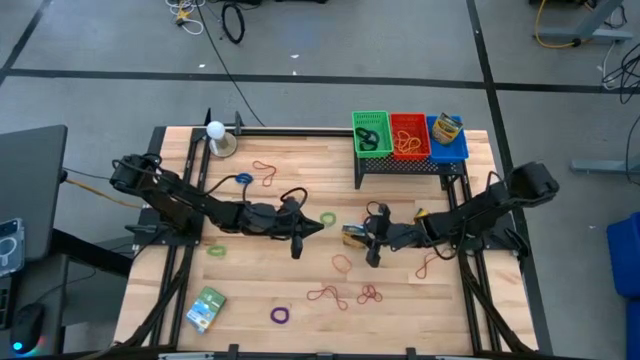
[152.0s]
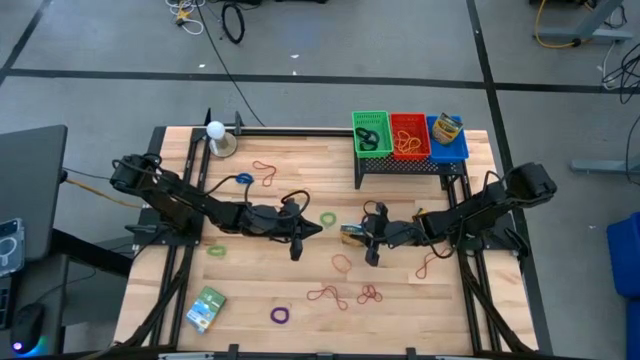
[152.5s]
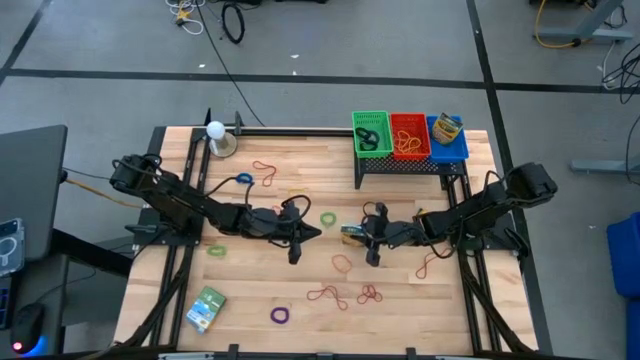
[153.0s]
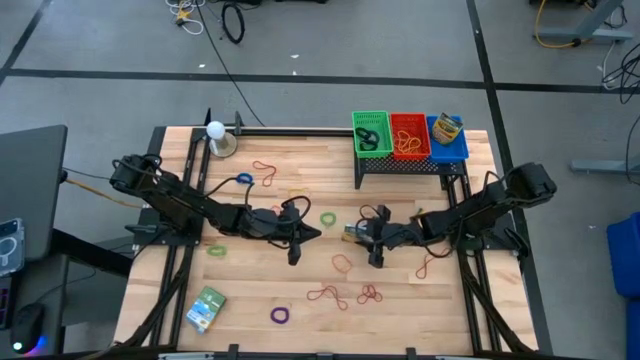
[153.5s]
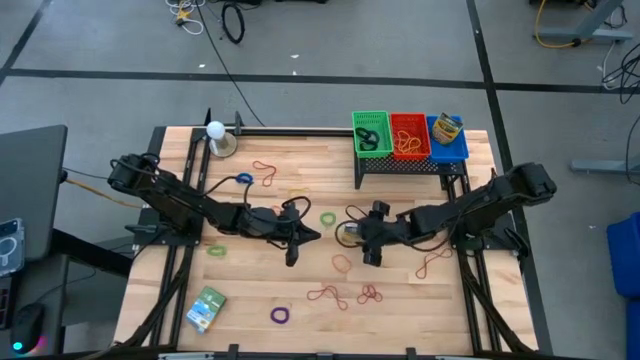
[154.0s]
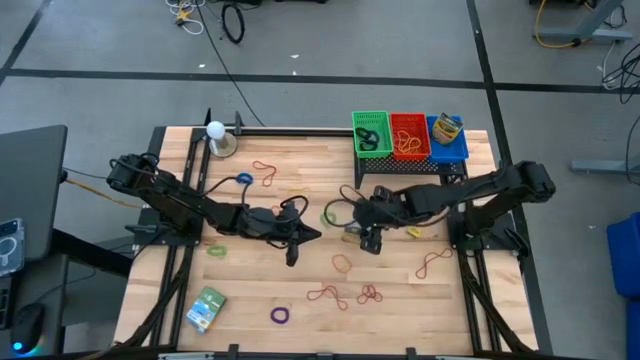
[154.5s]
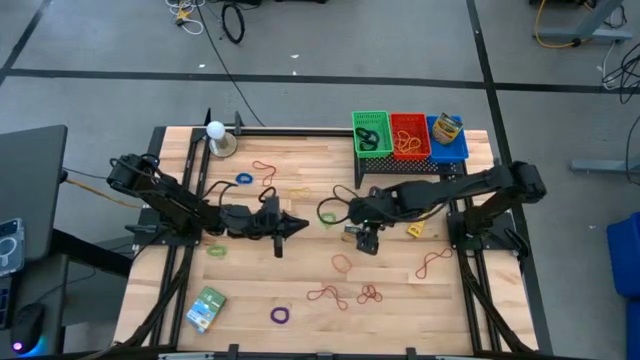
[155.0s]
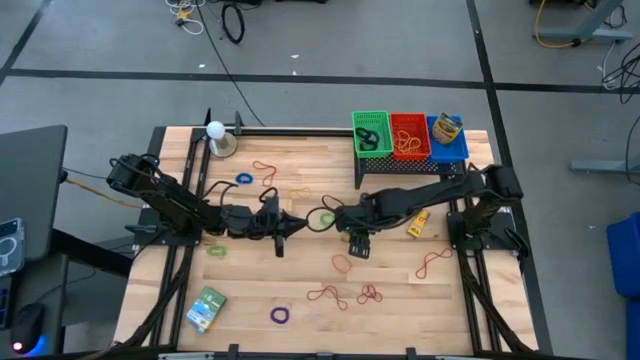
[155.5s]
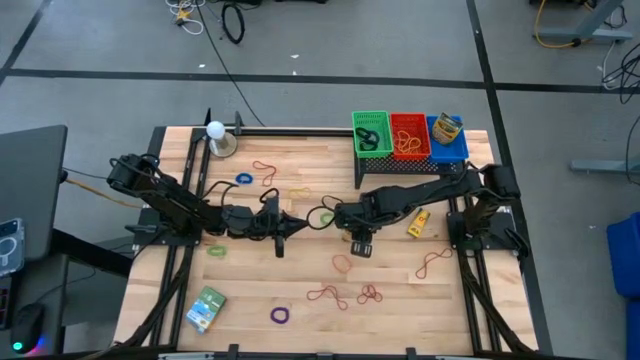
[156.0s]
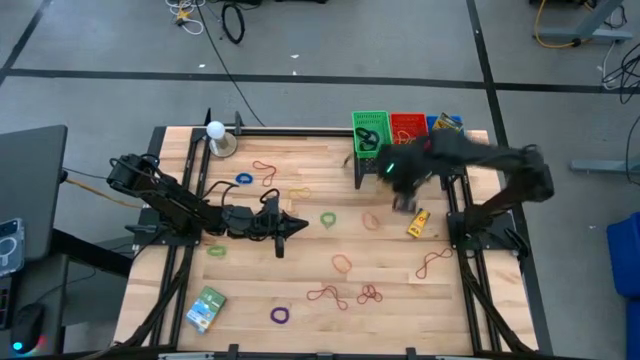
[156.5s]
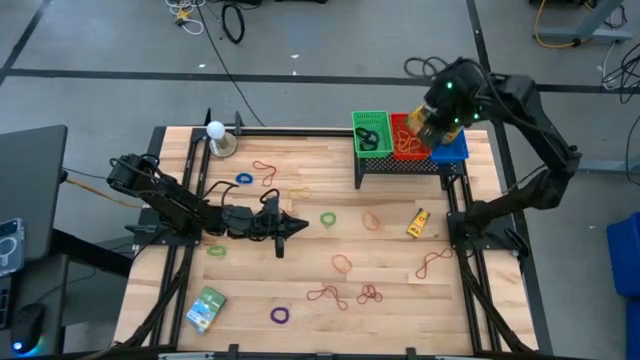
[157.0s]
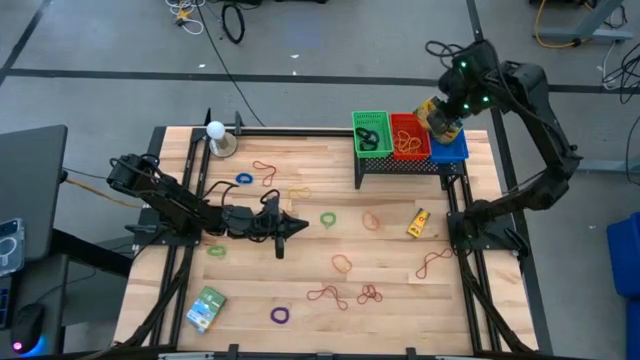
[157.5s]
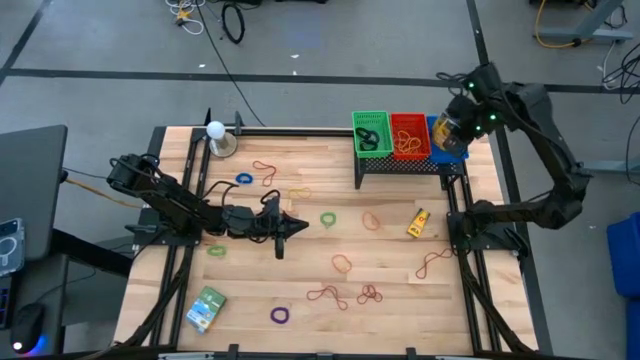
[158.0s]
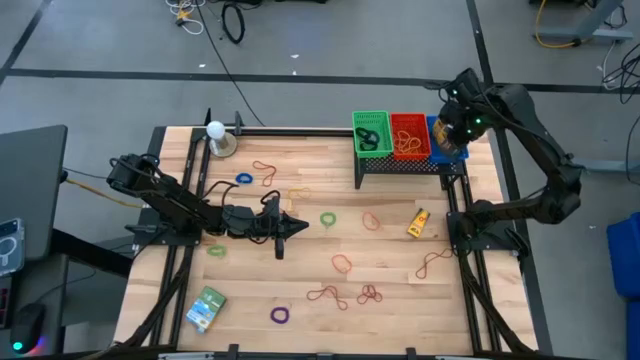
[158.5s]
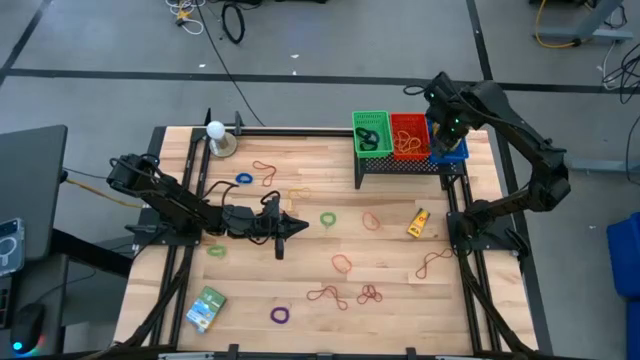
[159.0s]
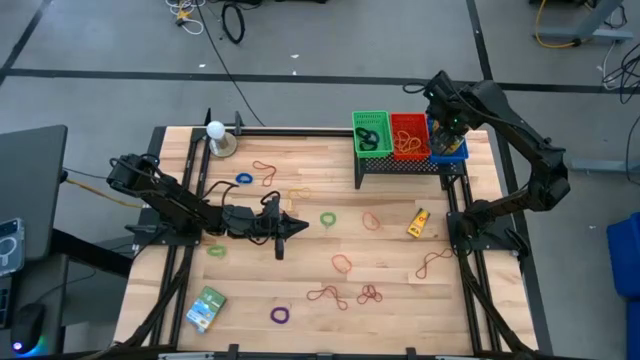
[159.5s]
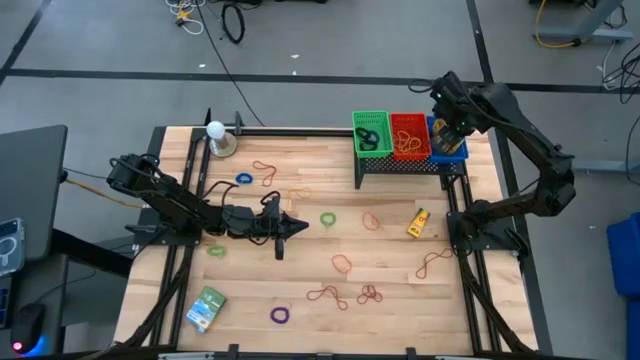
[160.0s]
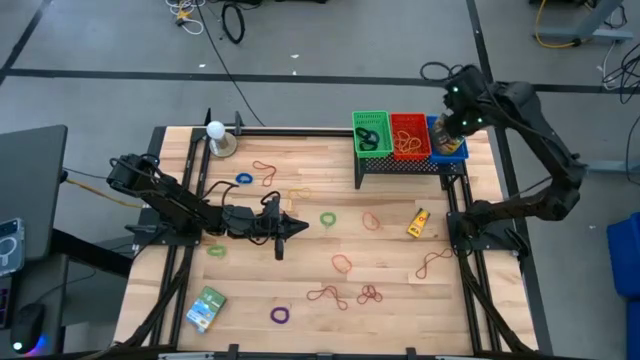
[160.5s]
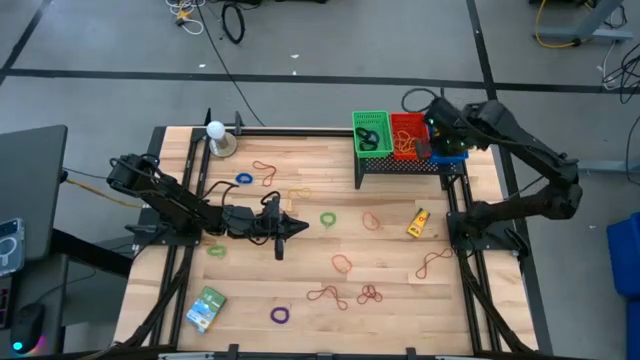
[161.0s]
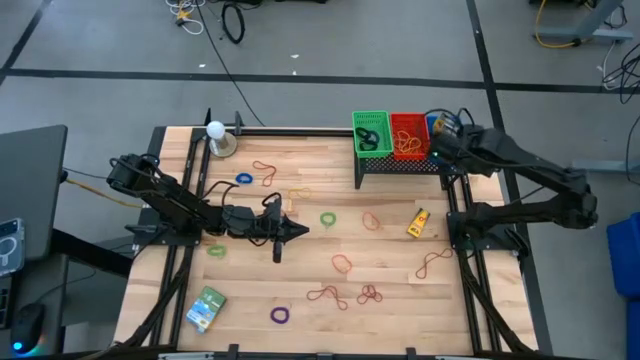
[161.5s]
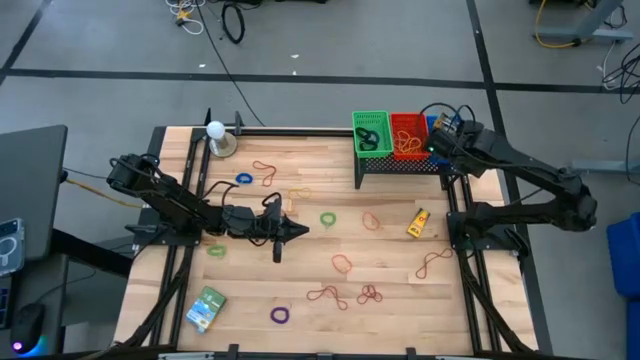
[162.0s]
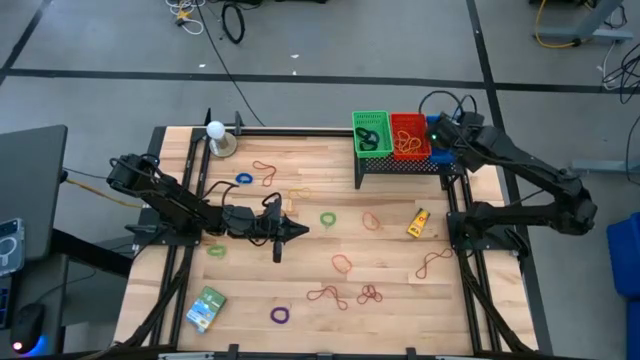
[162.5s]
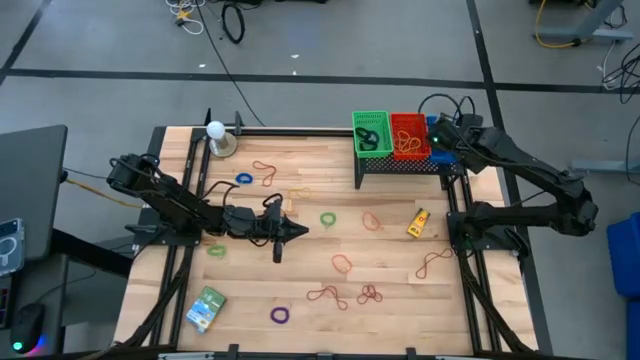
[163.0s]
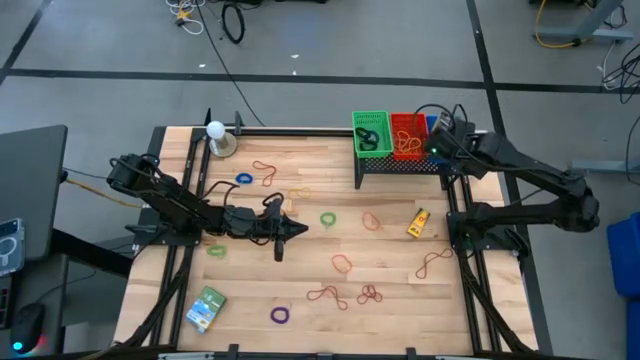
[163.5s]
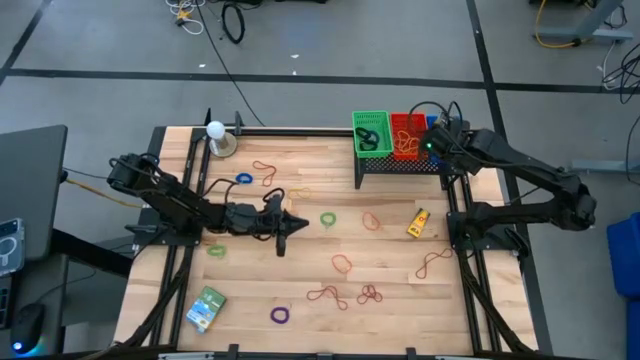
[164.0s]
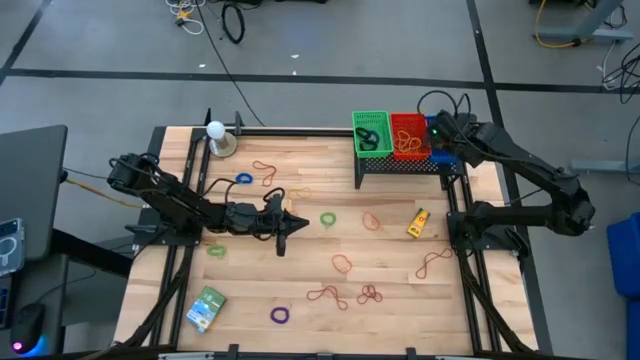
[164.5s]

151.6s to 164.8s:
Task: Pick & Place Office Desk Supplies
Put the large crayon box into the blue bin

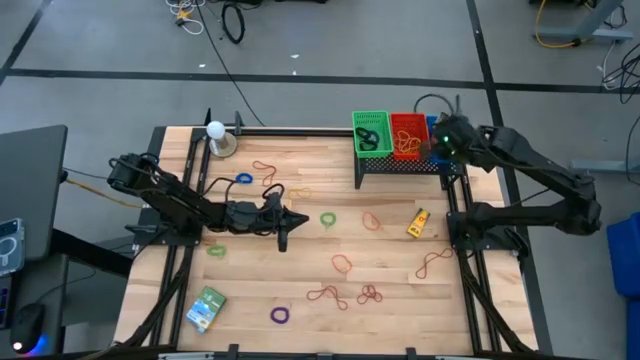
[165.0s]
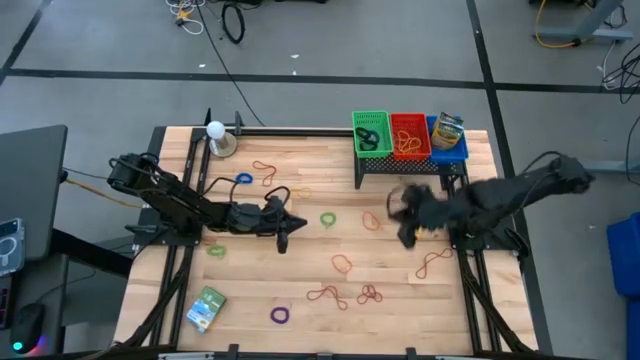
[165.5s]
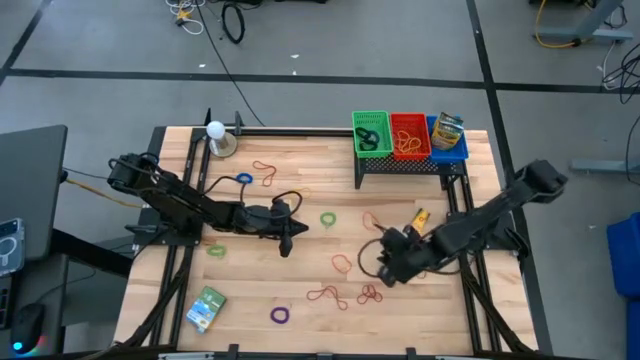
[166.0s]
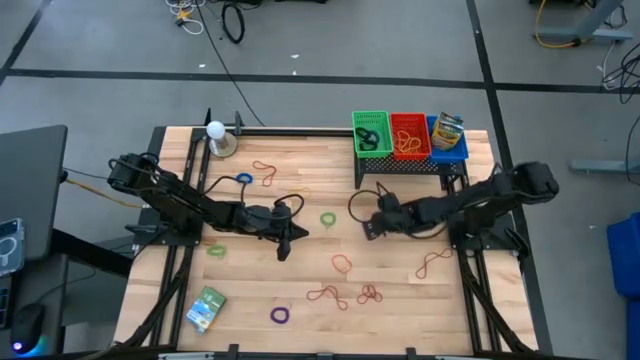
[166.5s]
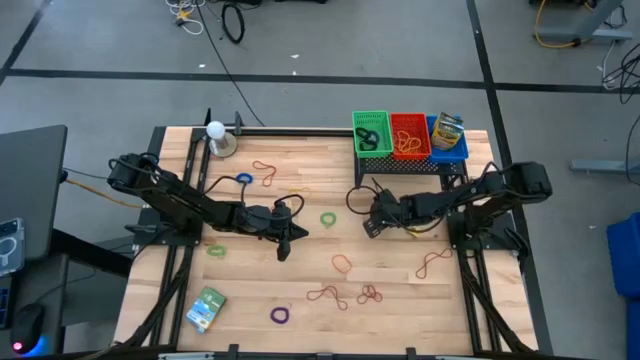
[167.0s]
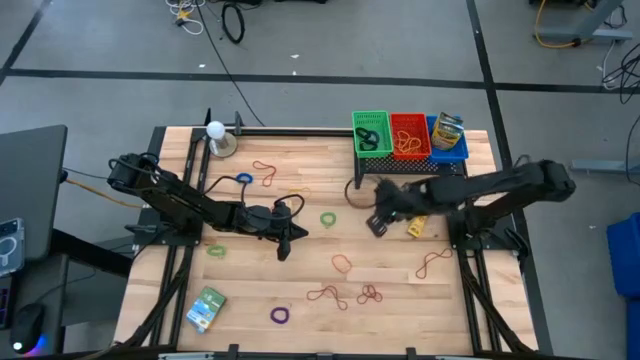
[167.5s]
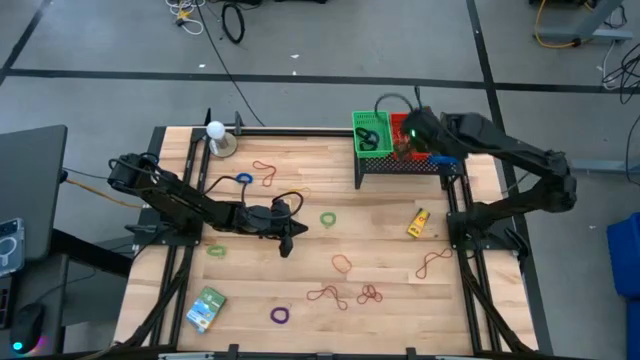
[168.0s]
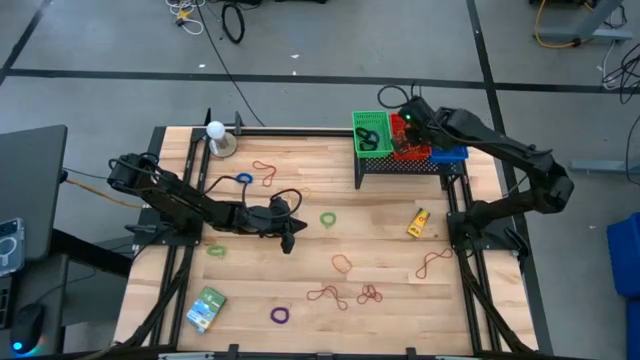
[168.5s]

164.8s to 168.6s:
Put the orange rubber band into the red bin

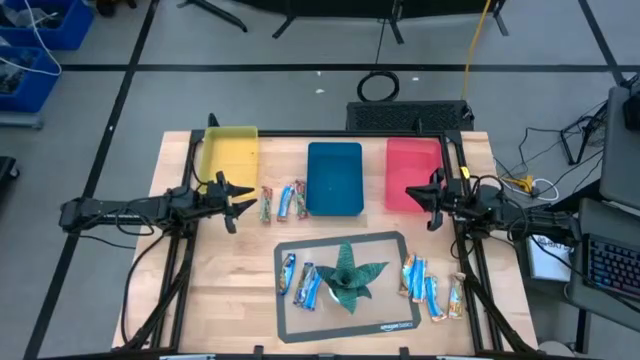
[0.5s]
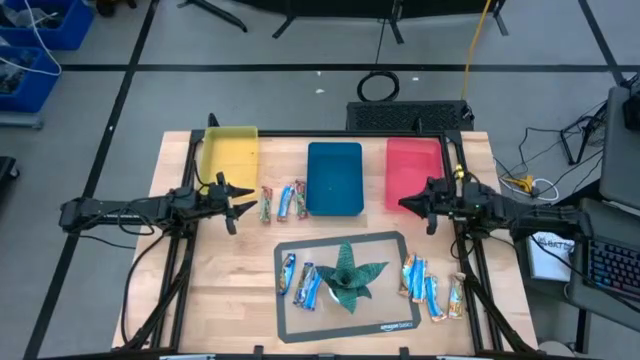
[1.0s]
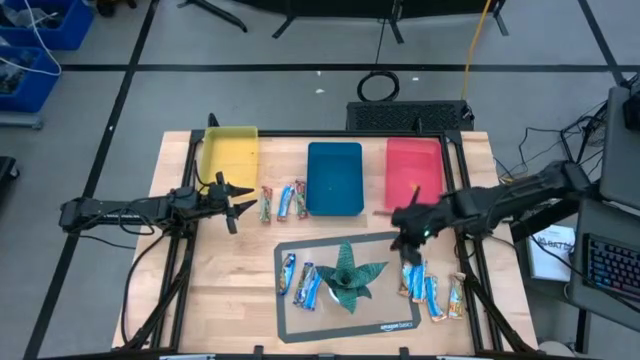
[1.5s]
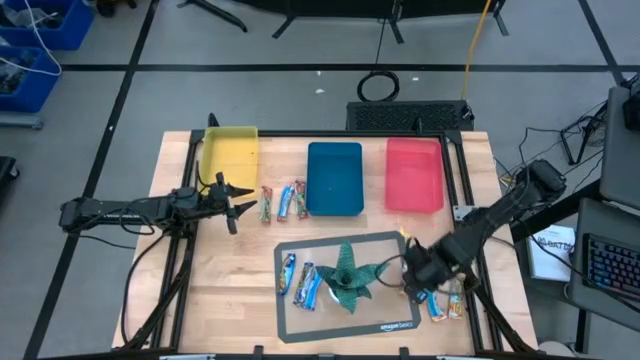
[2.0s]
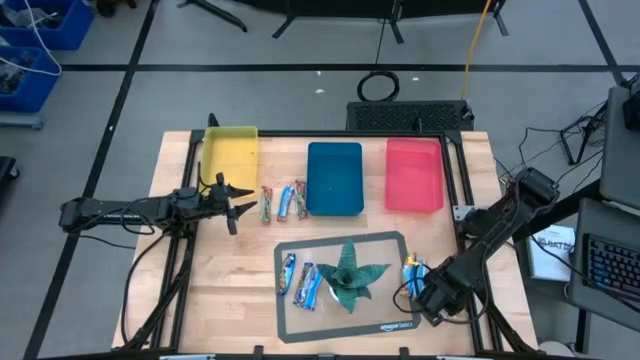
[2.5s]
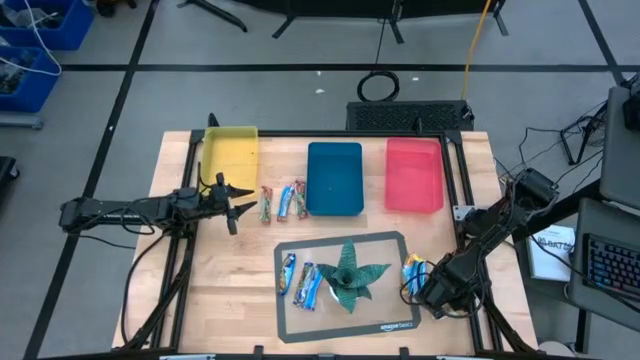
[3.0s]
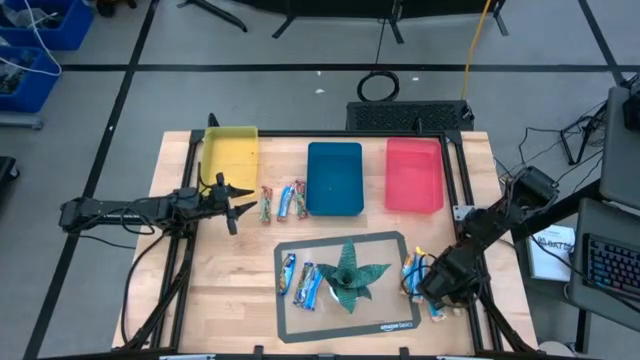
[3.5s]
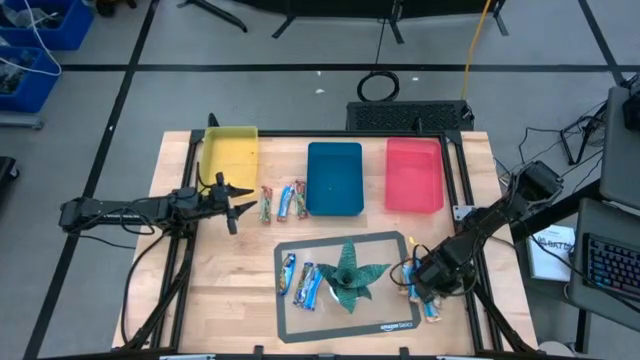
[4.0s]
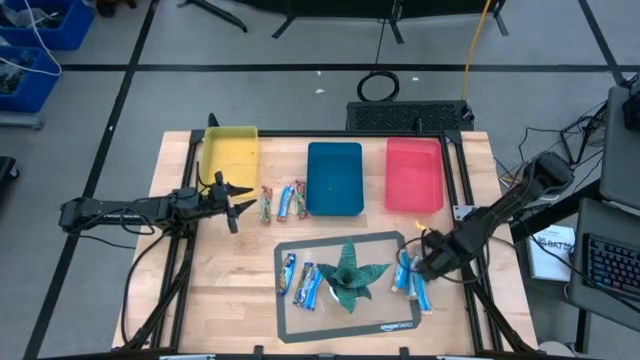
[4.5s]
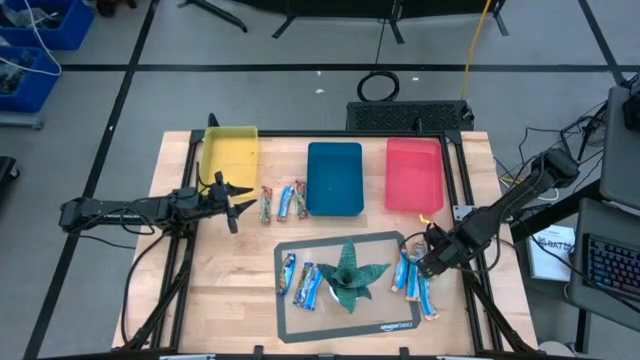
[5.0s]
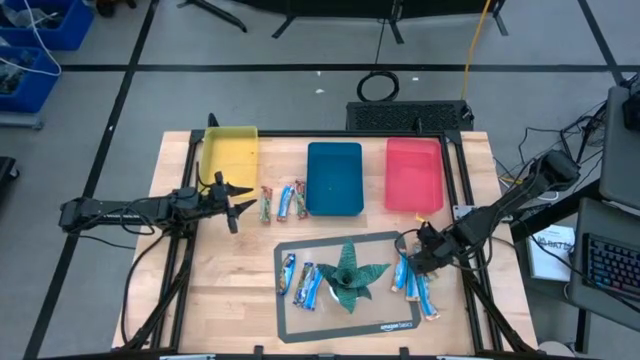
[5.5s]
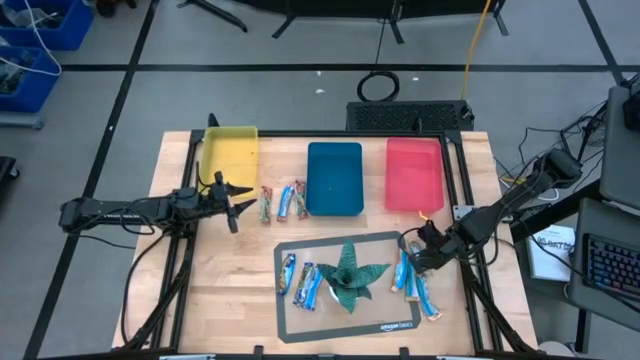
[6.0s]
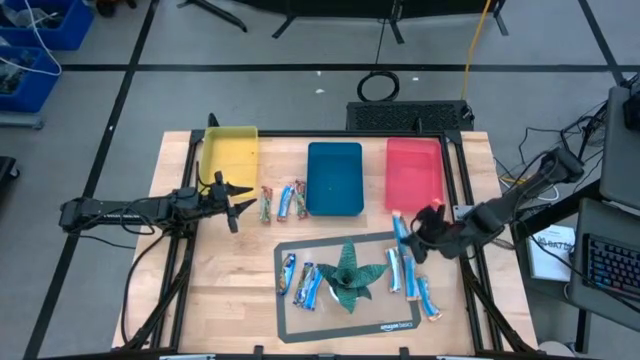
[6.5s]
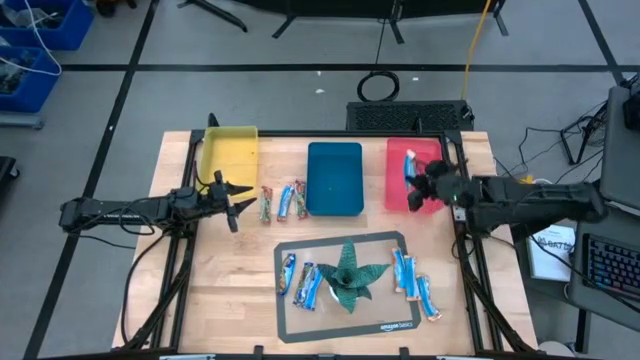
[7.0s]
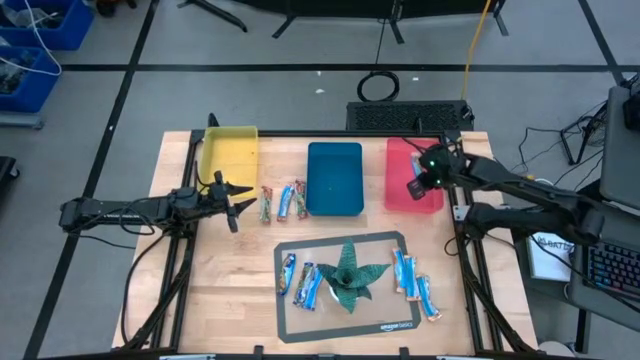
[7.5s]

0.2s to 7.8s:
Task: Pick and place Granola Bars by type
Put the yellow granola bar into the pink bin
